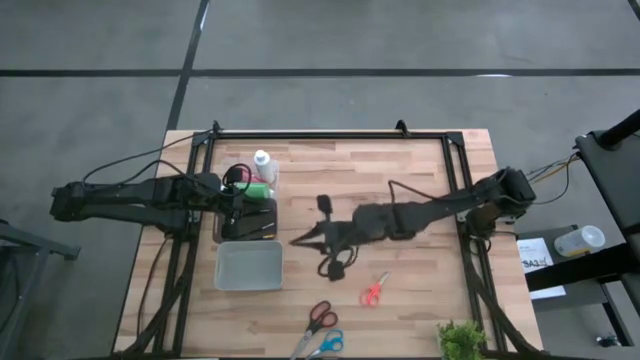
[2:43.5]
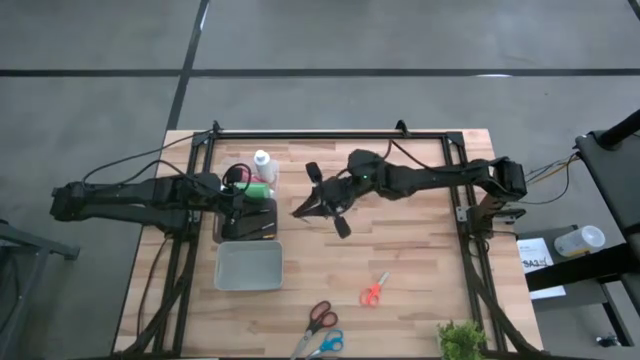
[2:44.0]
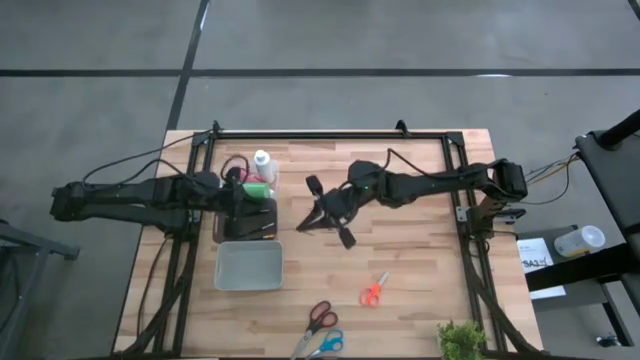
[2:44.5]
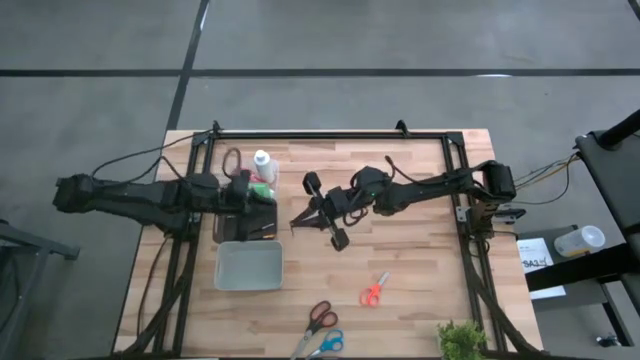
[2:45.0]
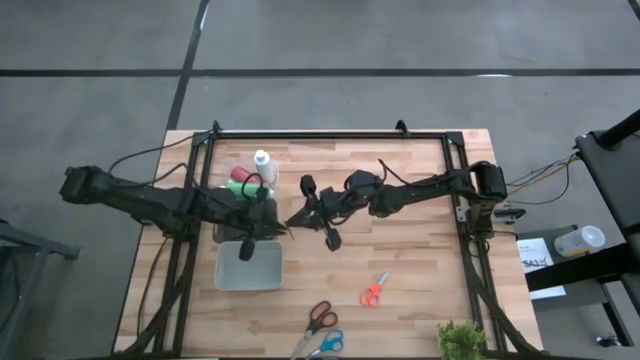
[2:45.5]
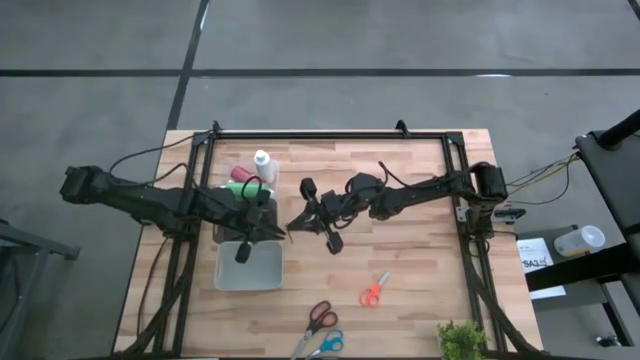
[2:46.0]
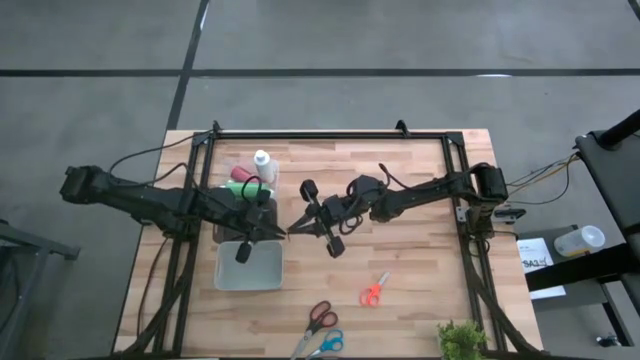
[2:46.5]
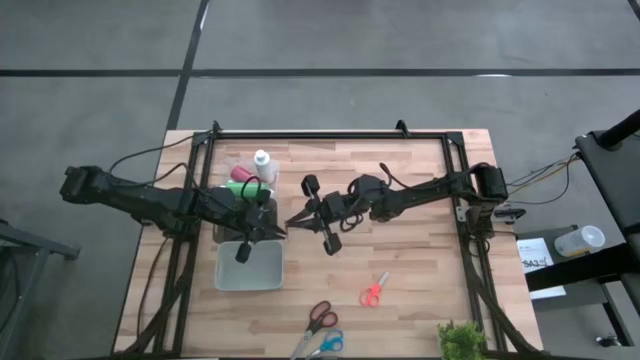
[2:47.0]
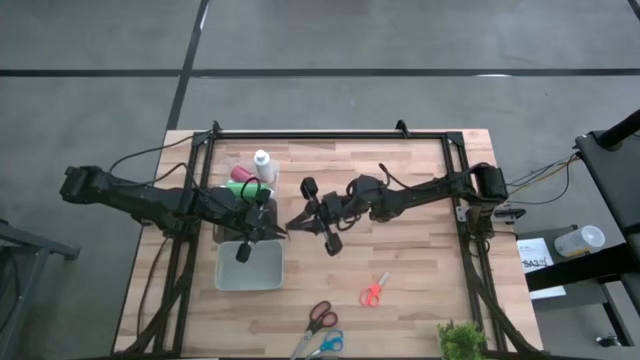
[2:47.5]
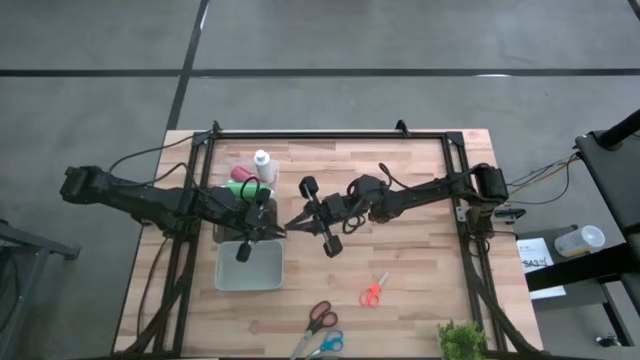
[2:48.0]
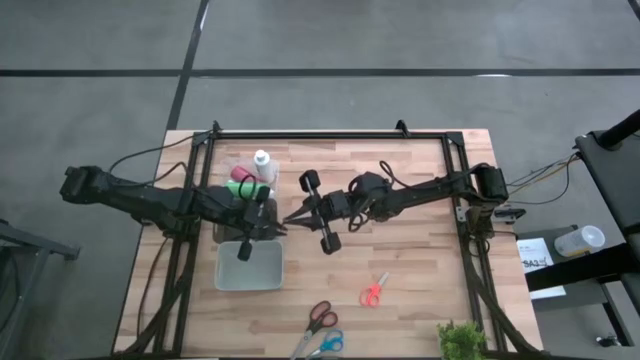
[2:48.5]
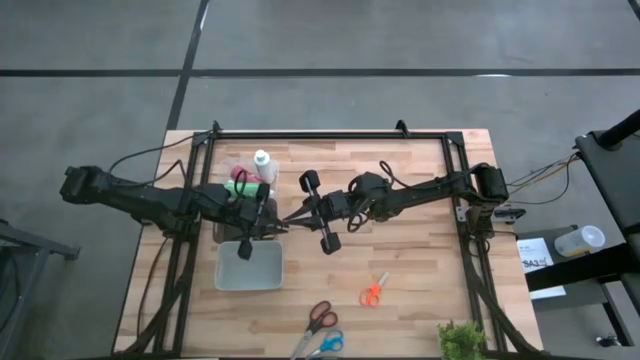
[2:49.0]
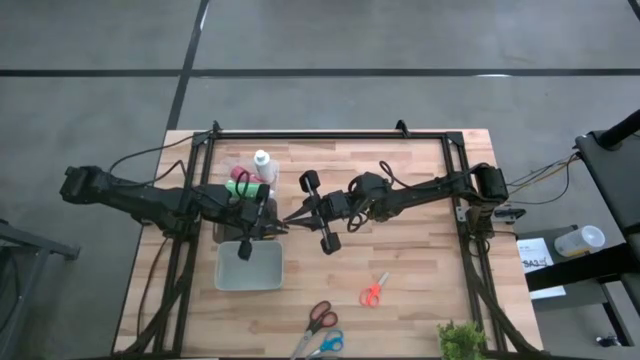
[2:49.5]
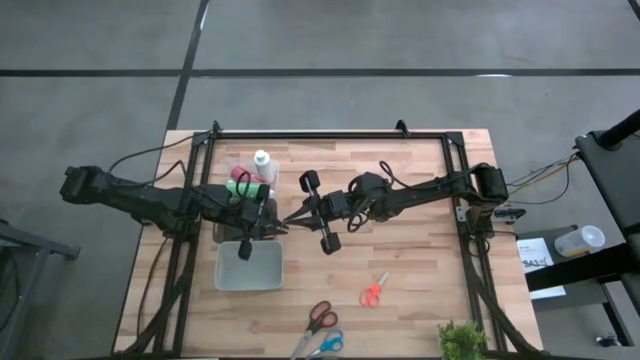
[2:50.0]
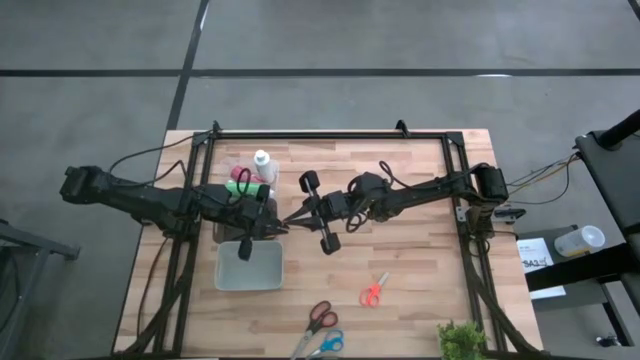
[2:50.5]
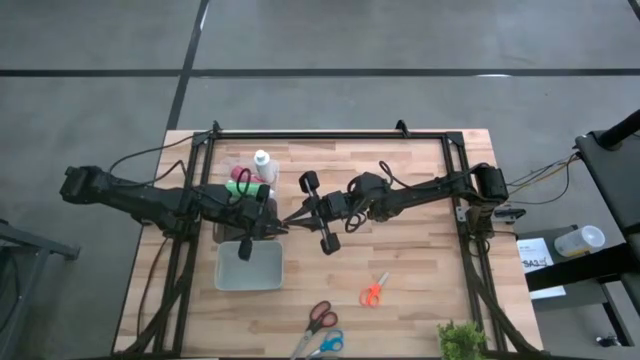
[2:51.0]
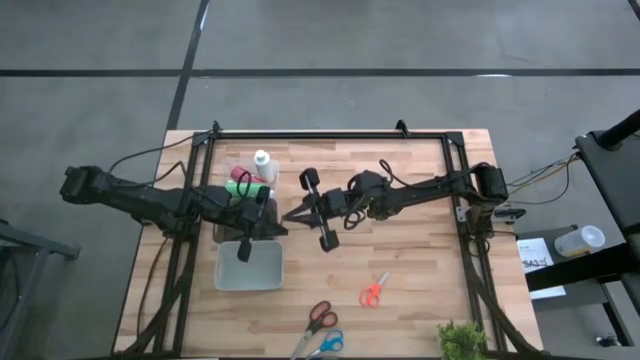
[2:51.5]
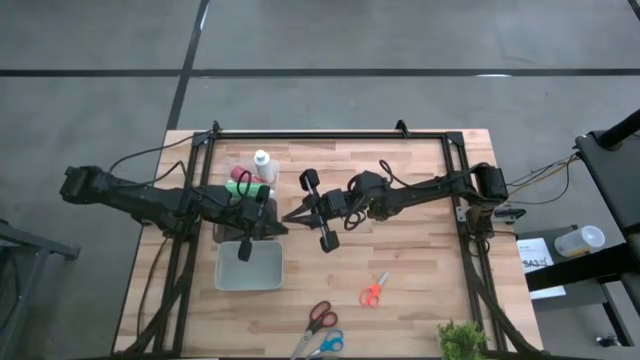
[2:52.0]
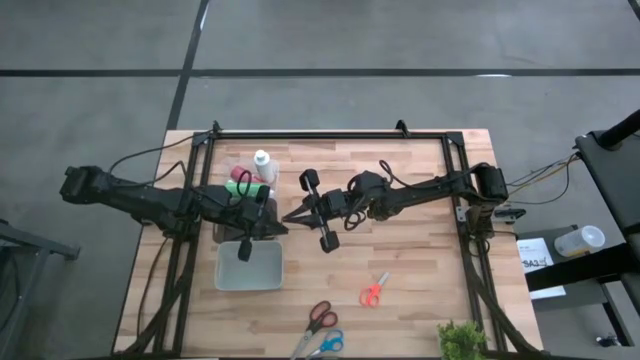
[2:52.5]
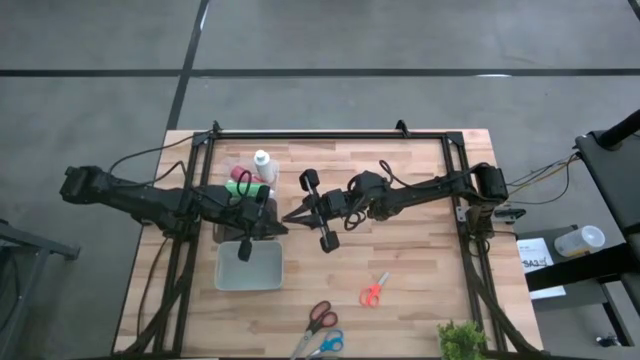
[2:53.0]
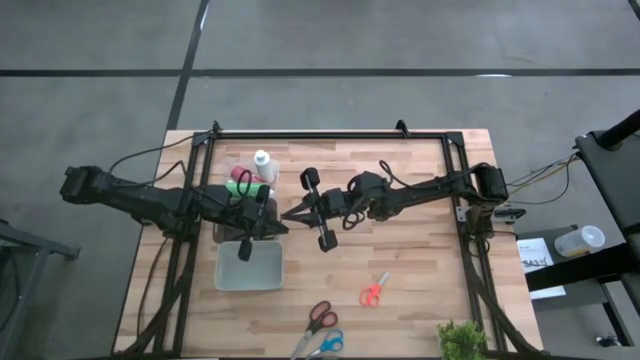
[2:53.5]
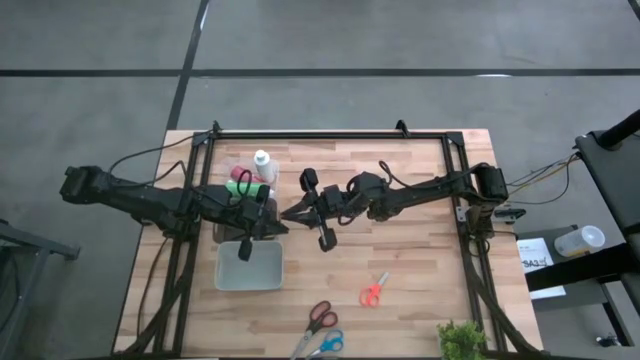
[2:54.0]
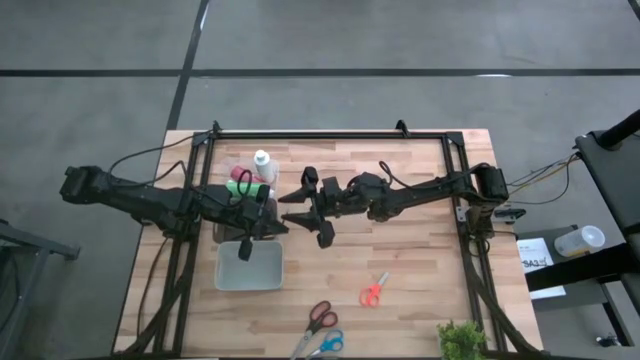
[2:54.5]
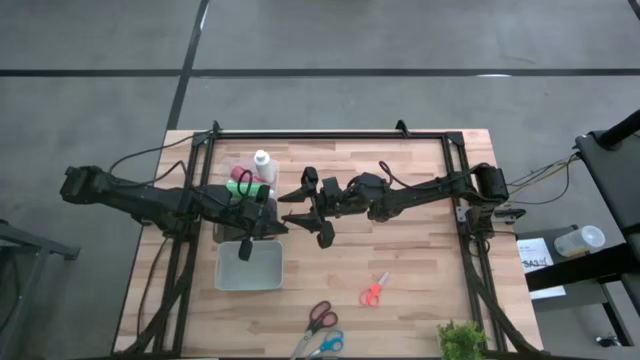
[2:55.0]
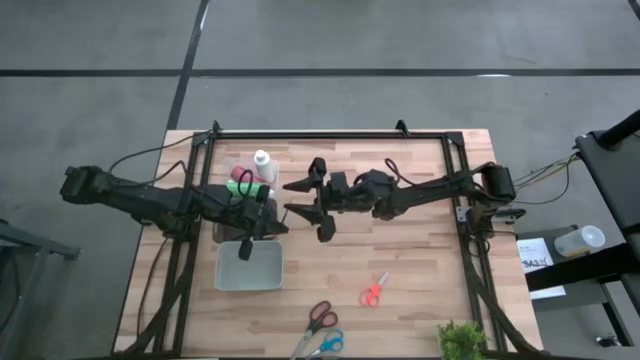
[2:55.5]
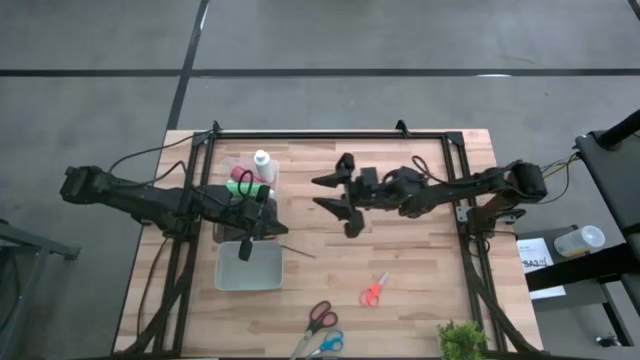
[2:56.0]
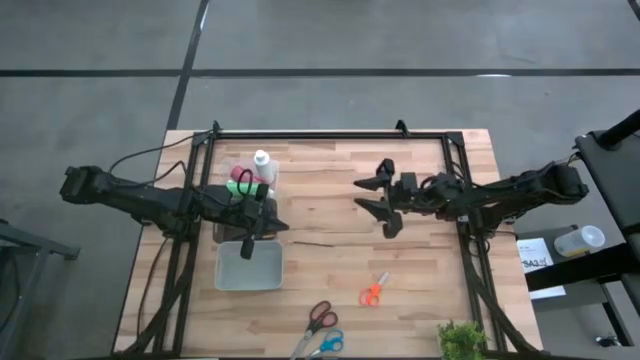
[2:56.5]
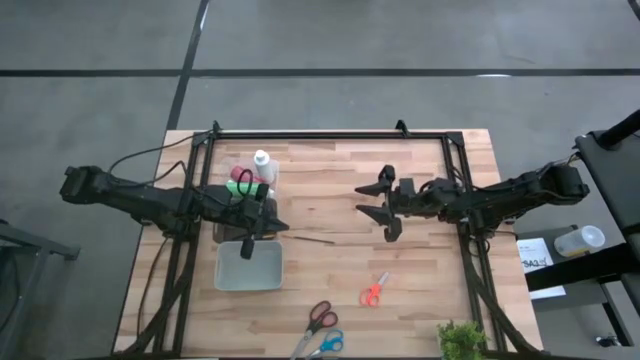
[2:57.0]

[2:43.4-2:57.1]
Task: Pick & Place Paint Supplies
Put the orange paint brush into the black bin

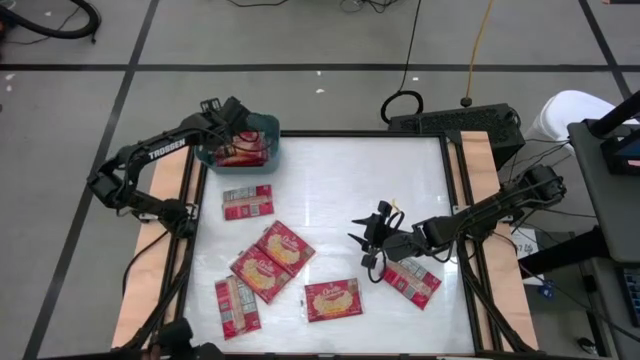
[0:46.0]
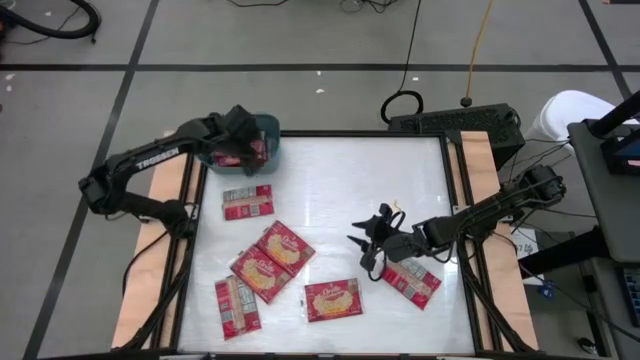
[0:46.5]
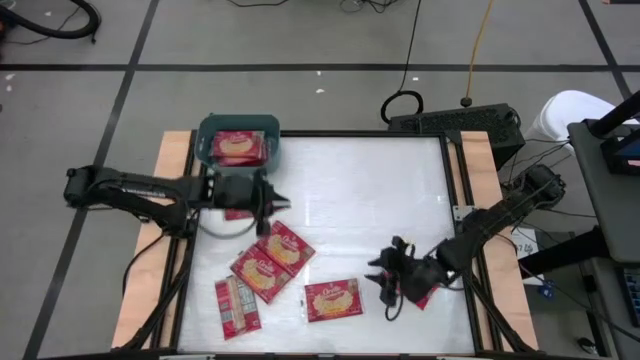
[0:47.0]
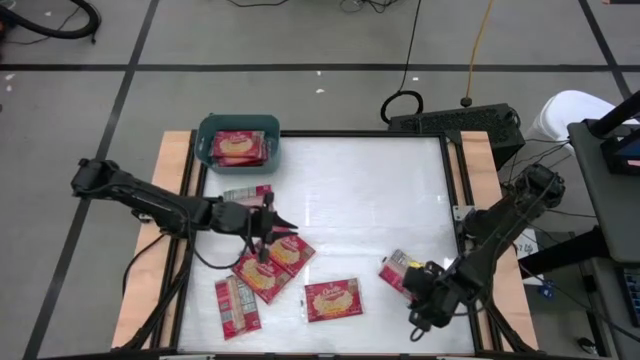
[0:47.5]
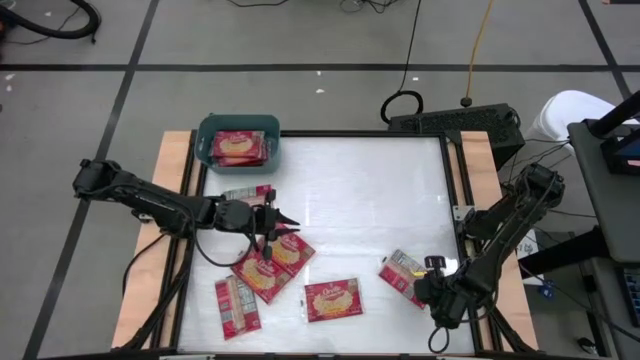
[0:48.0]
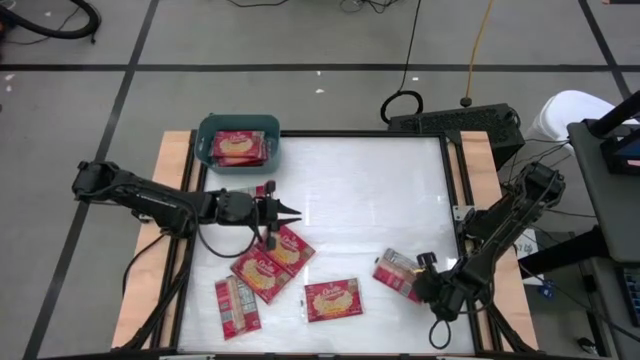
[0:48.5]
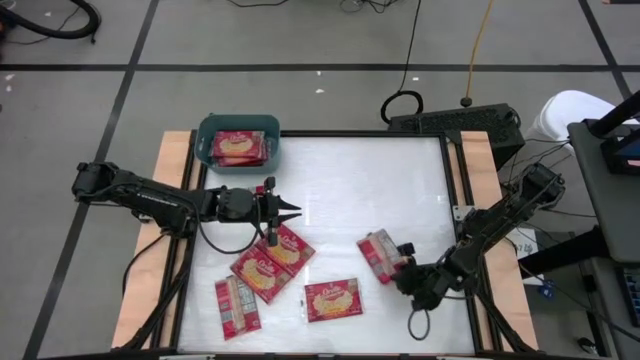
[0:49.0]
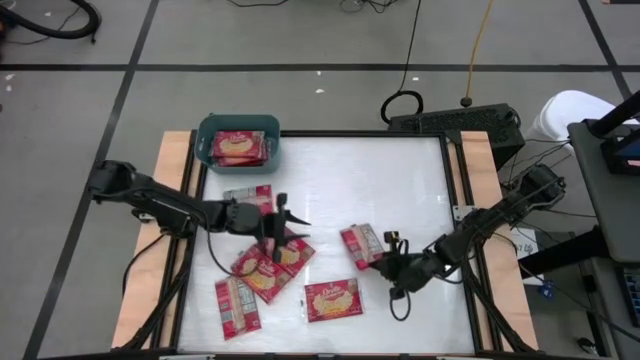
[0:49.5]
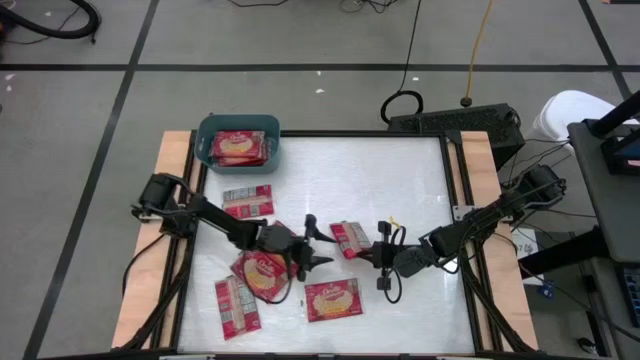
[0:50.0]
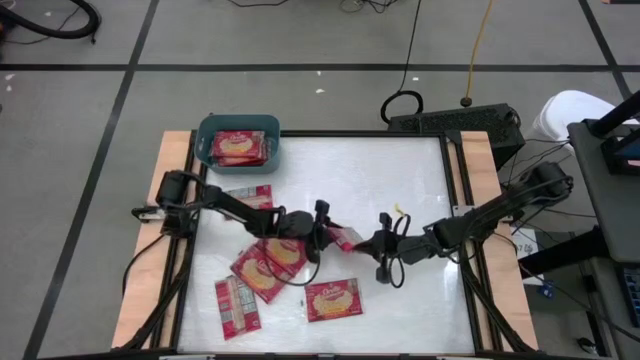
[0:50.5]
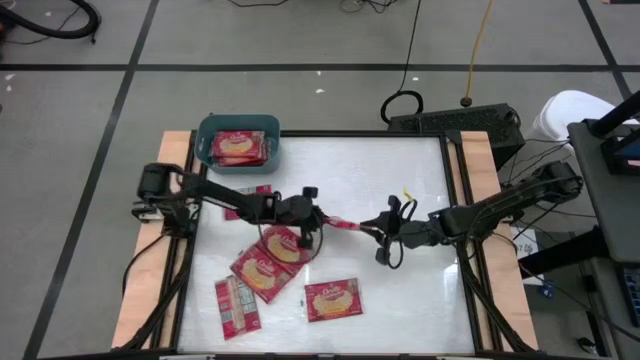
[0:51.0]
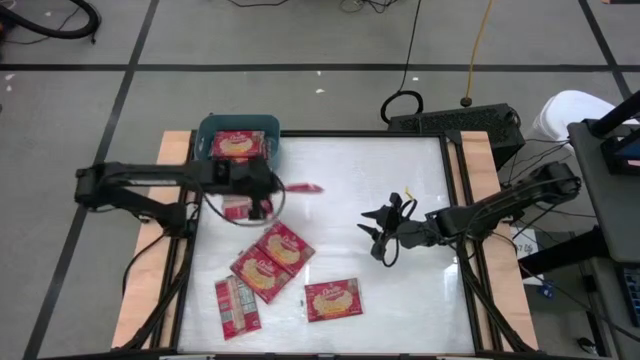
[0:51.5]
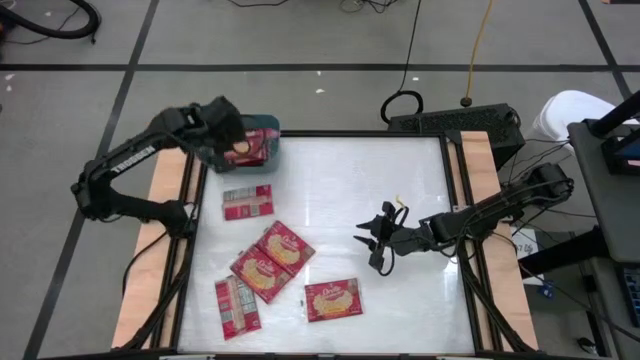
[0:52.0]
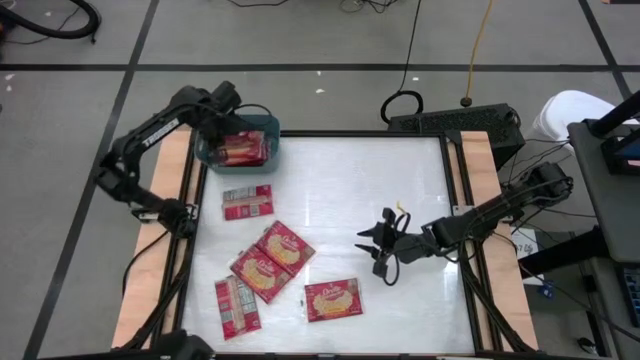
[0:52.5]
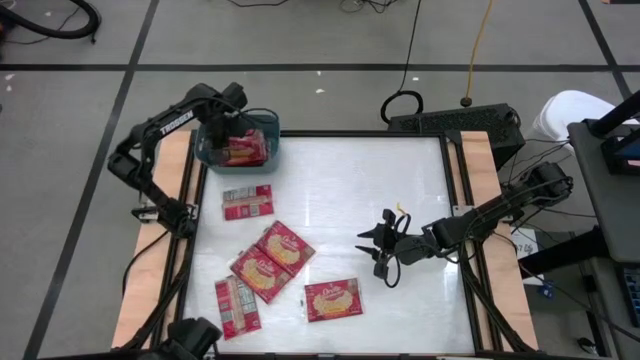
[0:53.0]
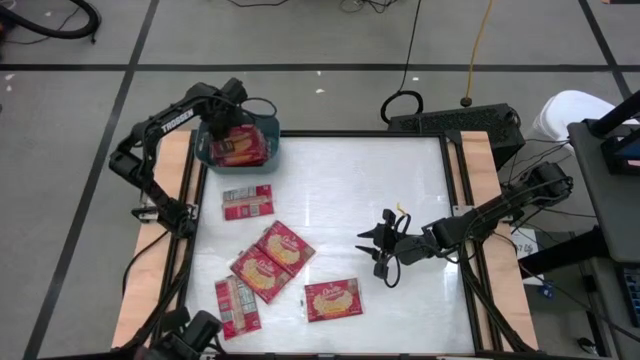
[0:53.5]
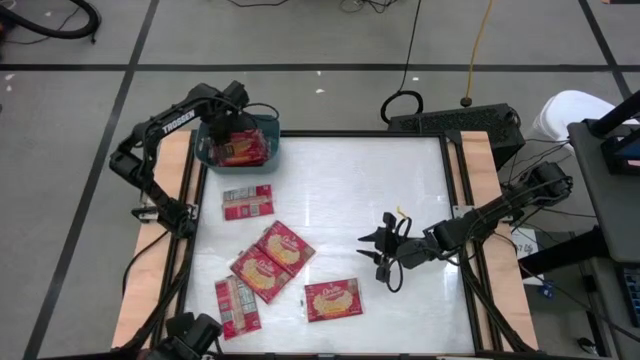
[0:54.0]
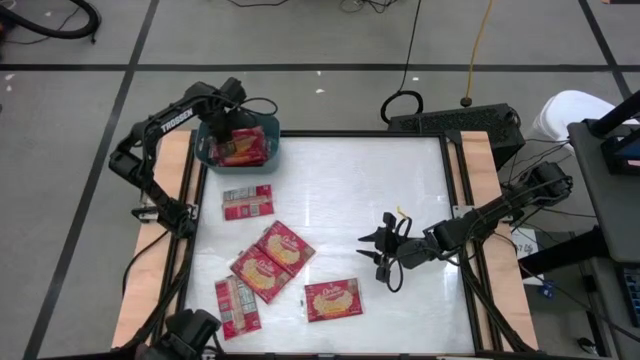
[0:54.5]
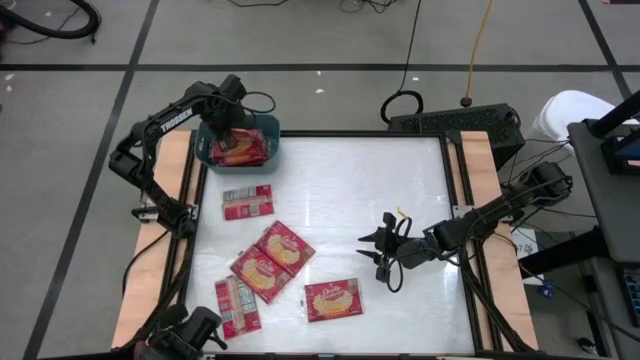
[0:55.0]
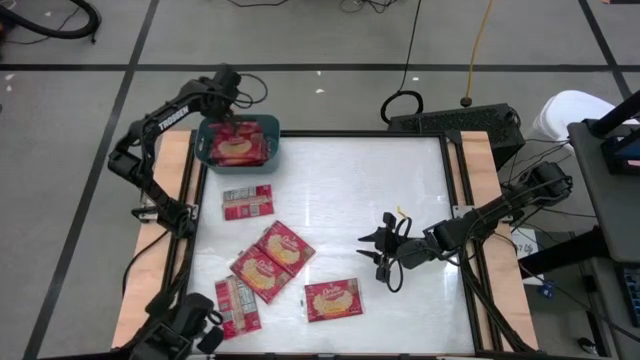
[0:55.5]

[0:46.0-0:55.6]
Task: Sort popcorn bags into baskets
Put the red popcorn bag into the blue bin
